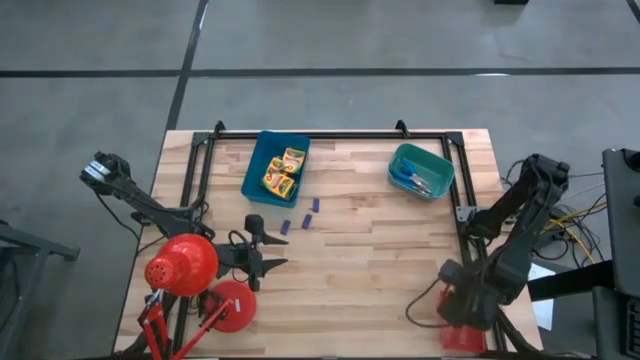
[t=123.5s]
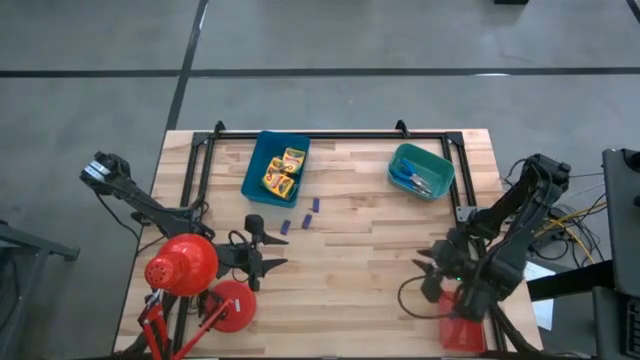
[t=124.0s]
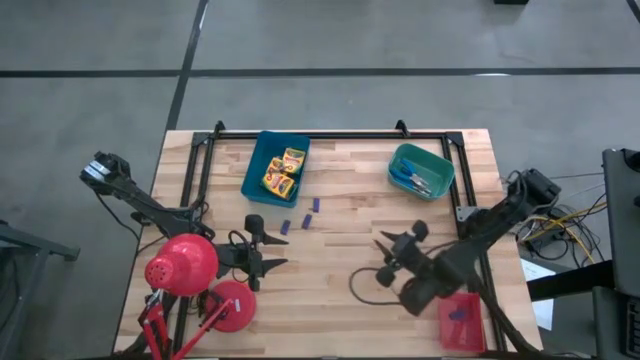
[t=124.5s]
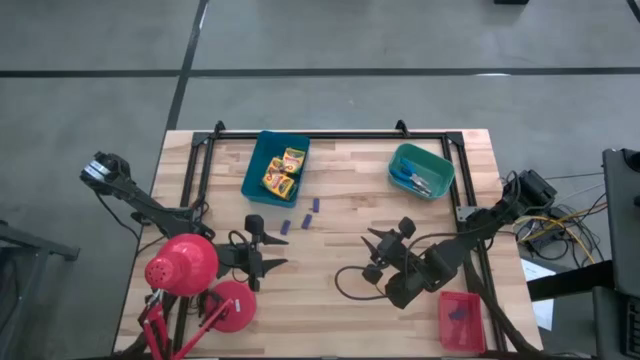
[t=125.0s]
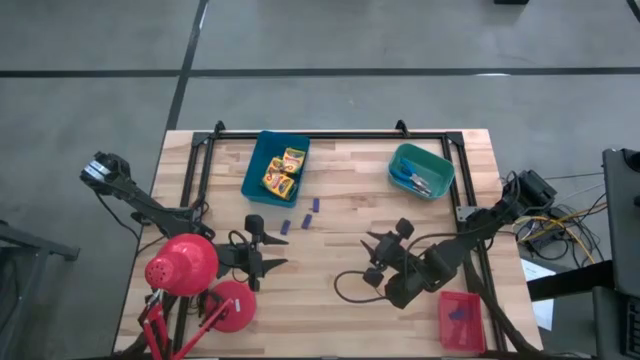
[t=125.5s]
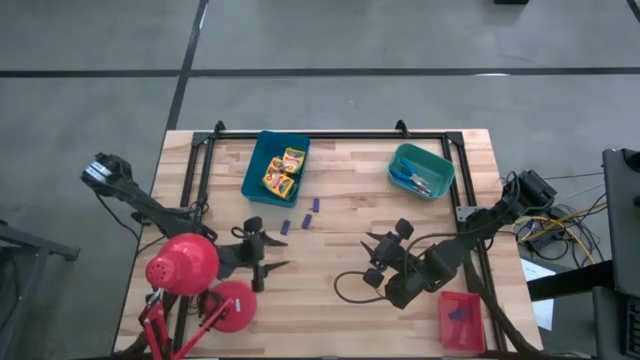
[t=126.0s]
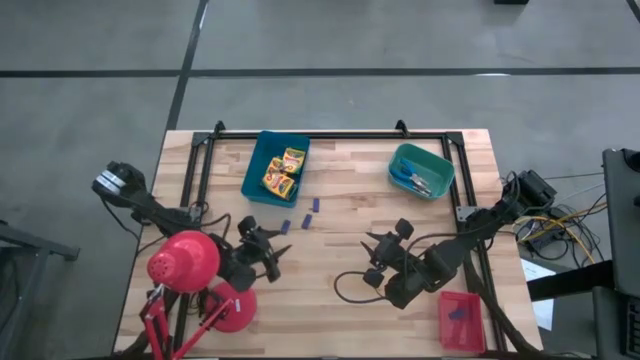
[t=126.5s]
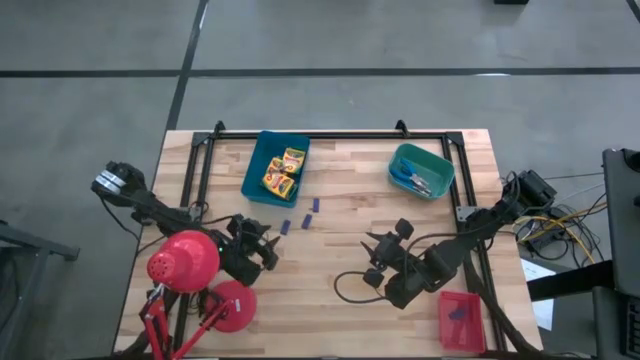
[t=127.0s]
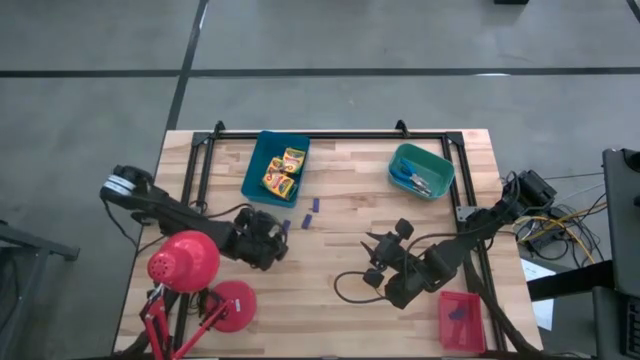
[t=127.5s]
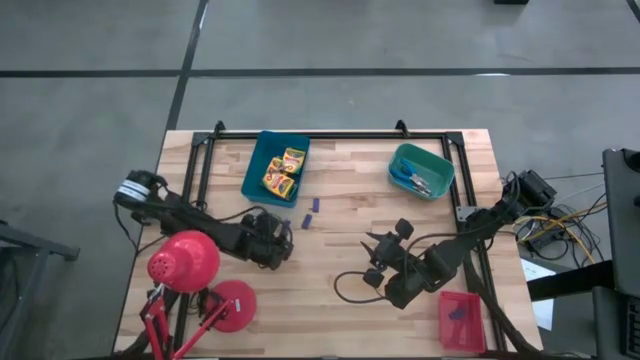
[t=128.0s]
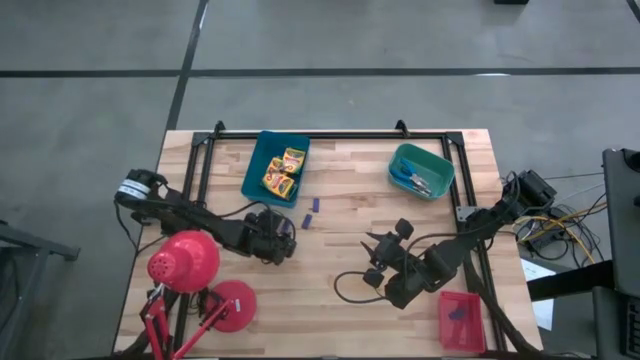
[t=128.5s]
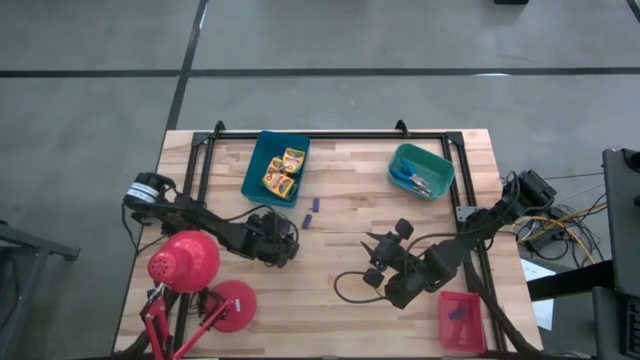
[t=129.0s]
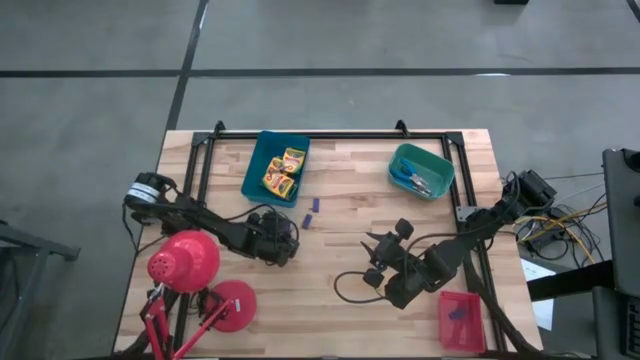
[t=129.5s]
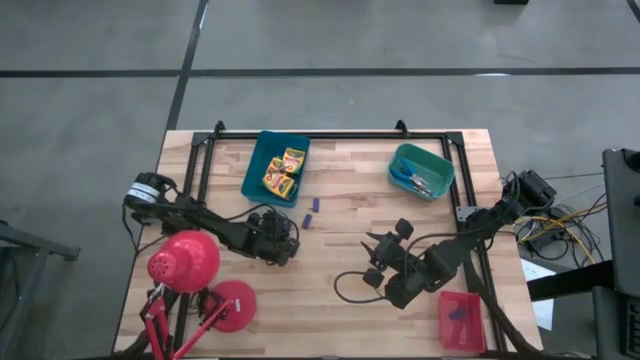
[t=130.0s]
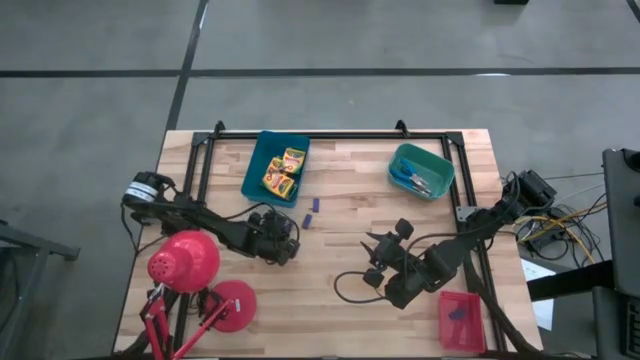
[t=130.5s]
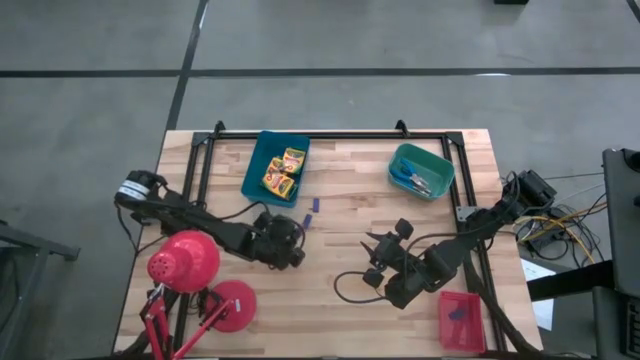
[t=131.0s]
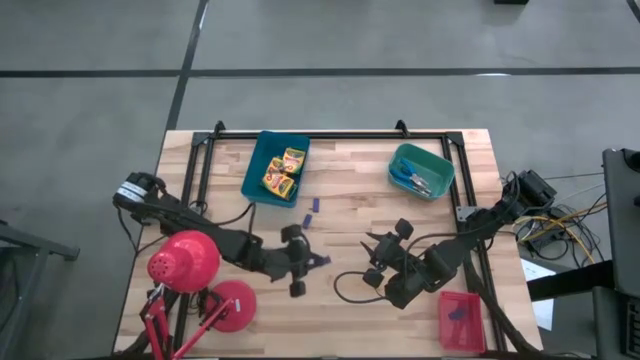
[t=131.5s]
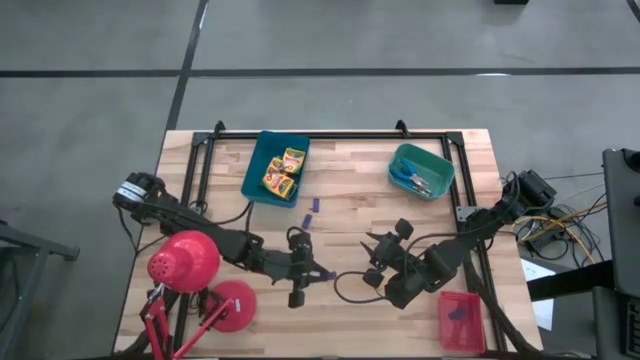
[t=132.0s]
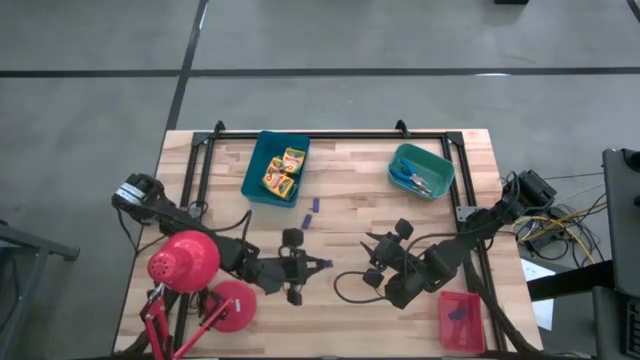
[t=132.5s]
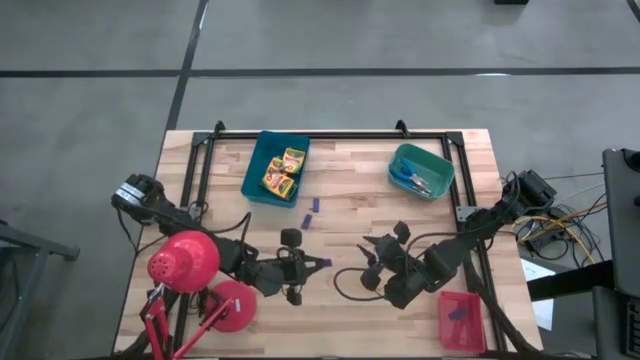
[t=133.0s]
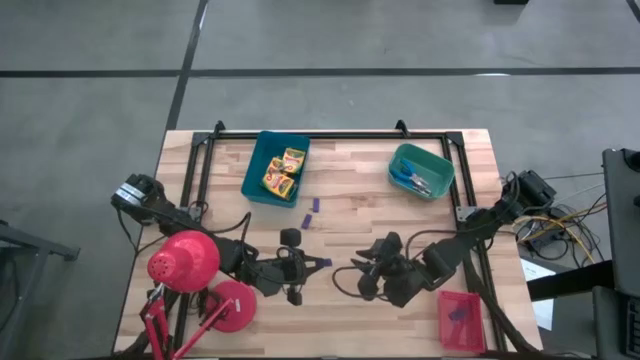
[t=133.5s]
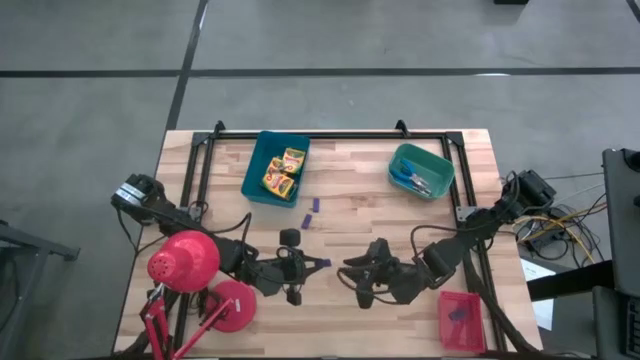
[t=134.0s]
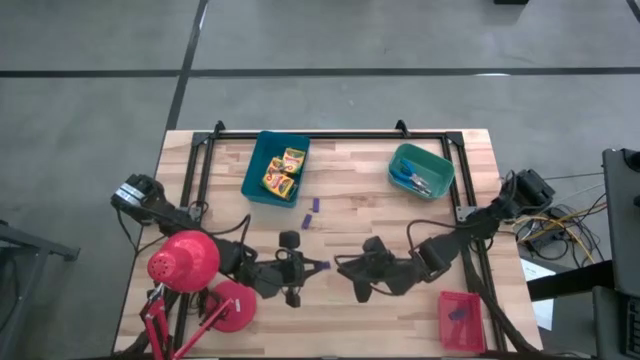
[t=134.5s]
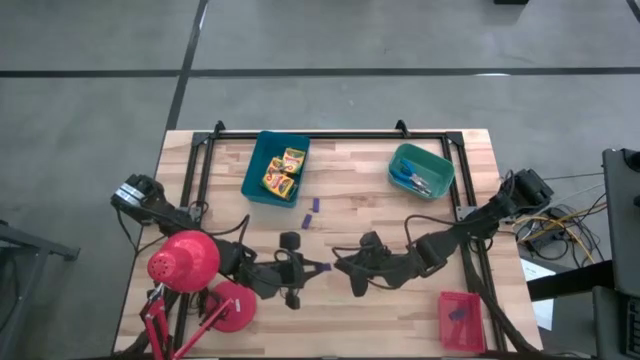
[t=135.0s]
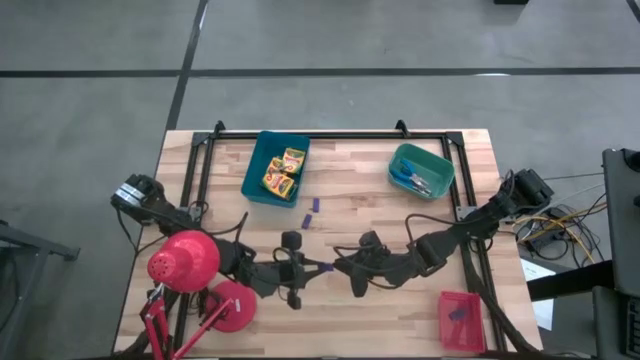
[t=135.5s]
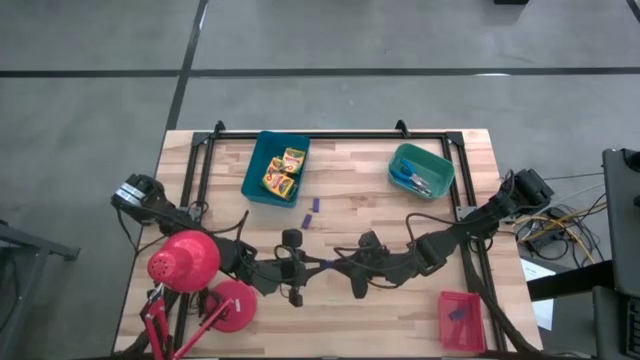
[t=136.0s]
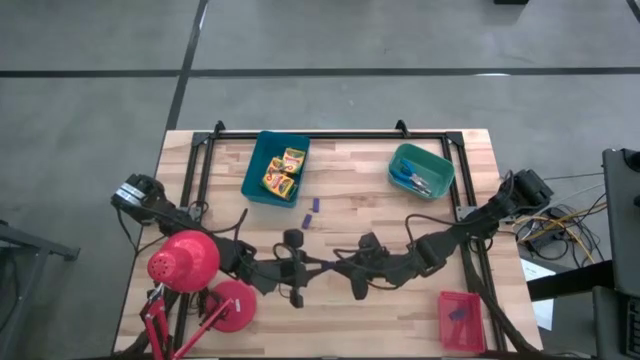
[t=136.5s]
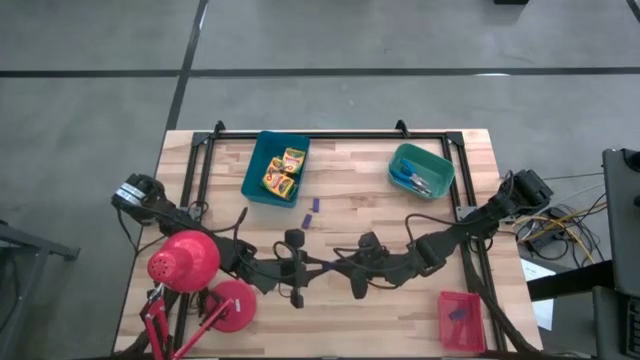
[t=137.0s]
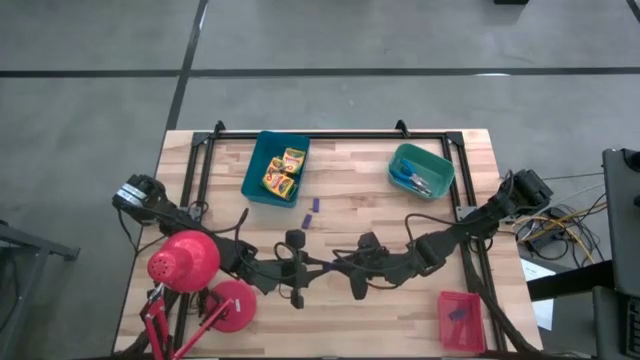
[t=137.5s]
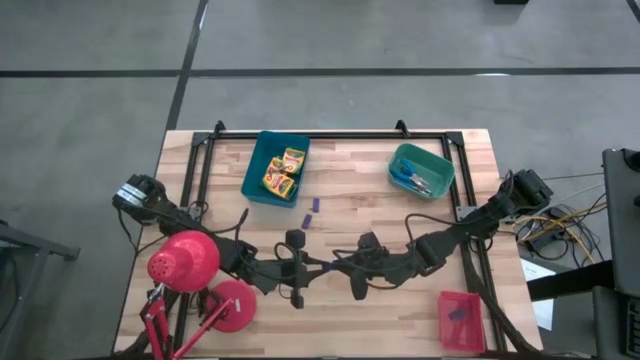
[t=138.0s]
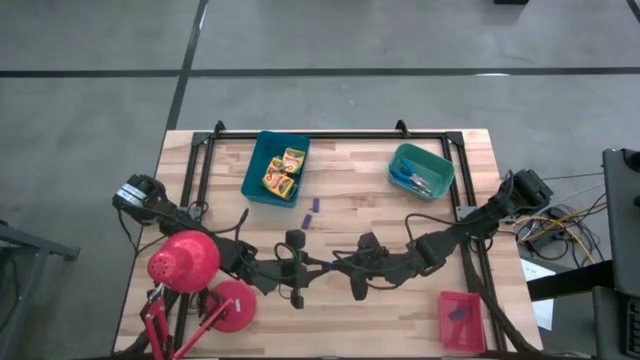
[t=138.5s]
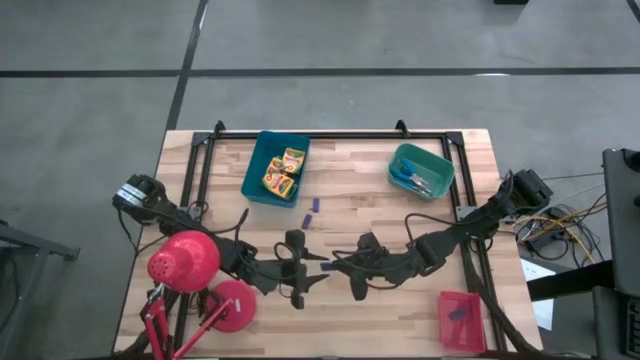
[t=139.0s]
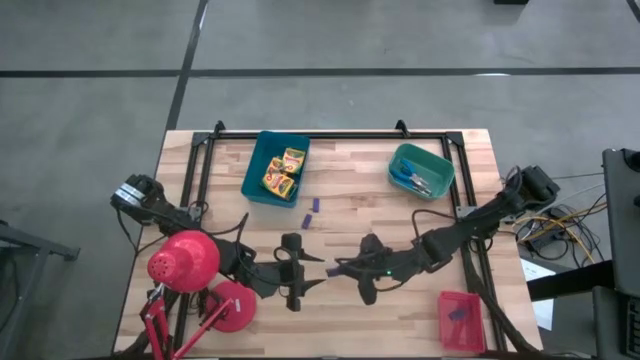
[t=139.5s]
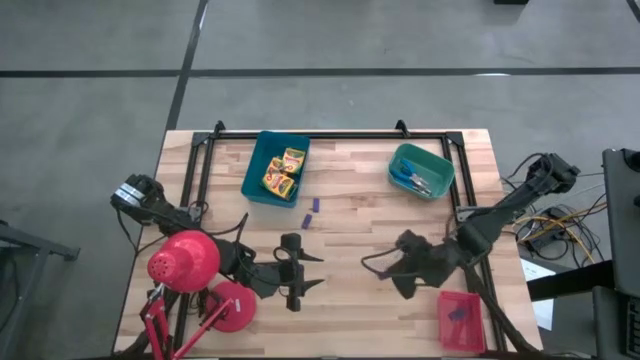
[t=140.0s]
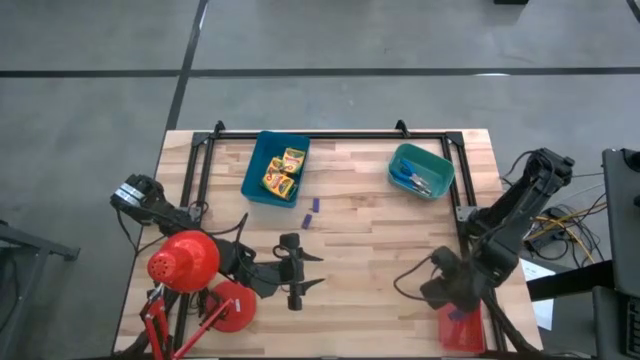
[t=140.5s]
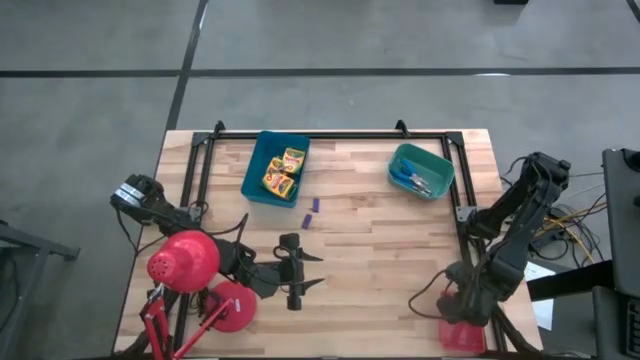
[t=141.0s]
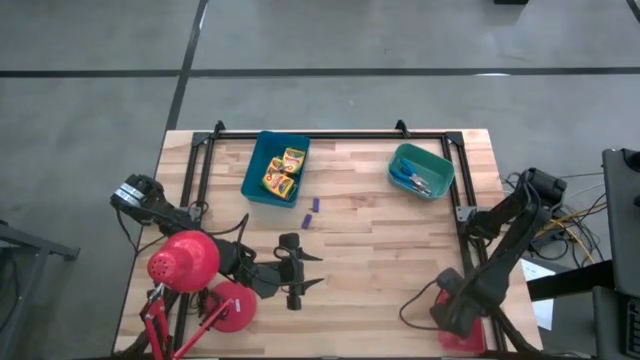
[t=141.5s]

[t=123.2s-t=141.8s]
Task: Pick & Place School Supplies
Put the purple eraser into the red bin

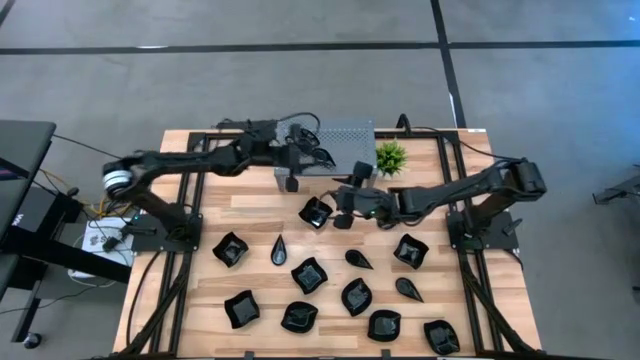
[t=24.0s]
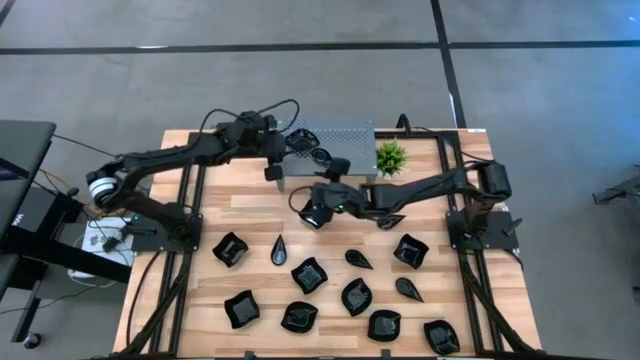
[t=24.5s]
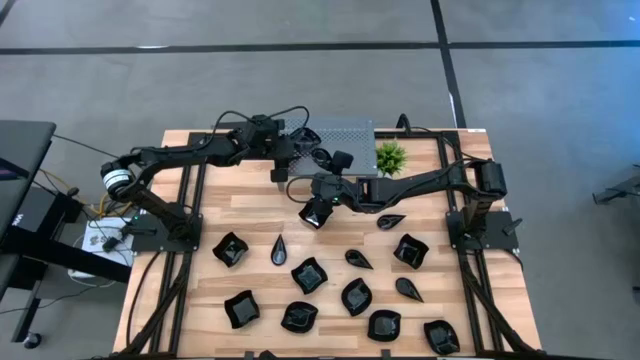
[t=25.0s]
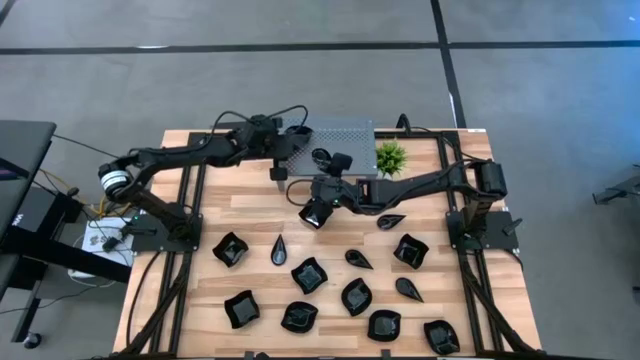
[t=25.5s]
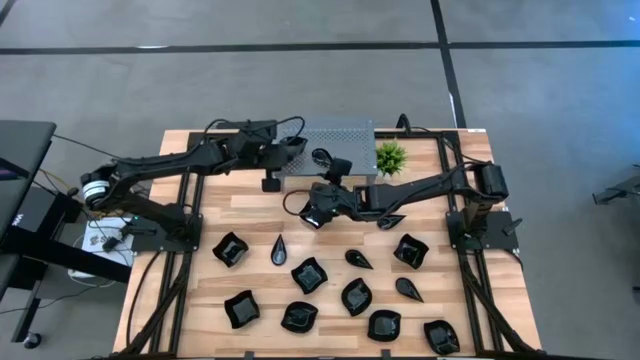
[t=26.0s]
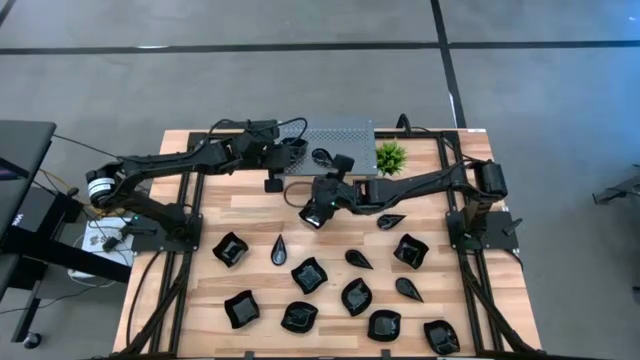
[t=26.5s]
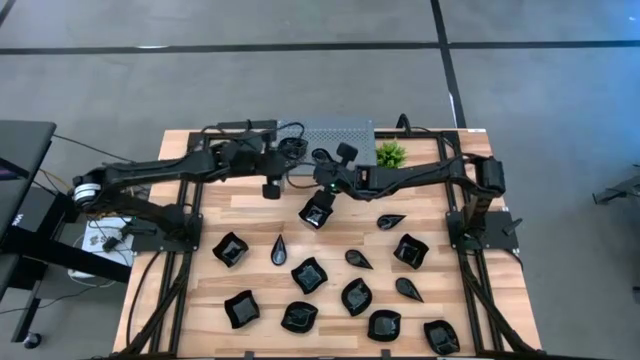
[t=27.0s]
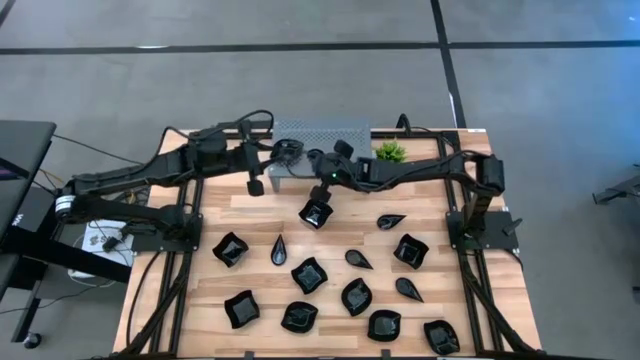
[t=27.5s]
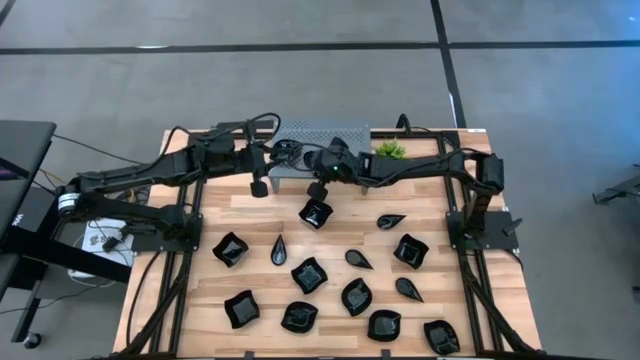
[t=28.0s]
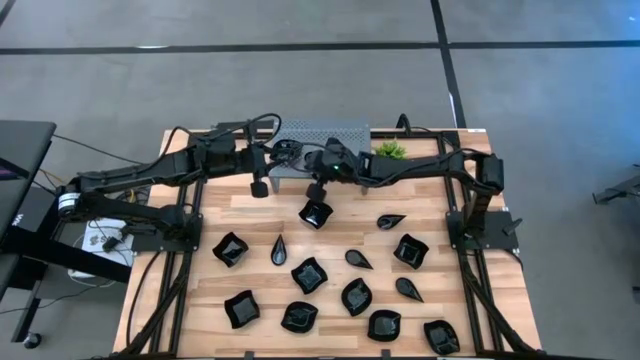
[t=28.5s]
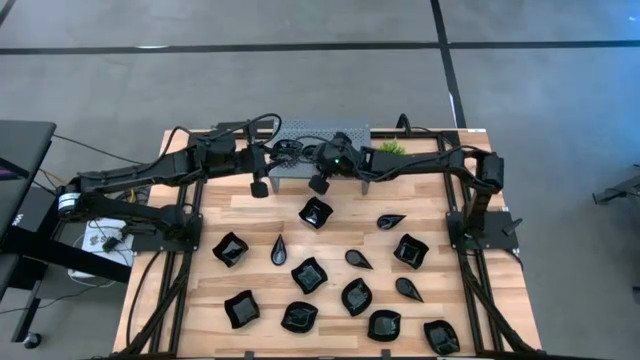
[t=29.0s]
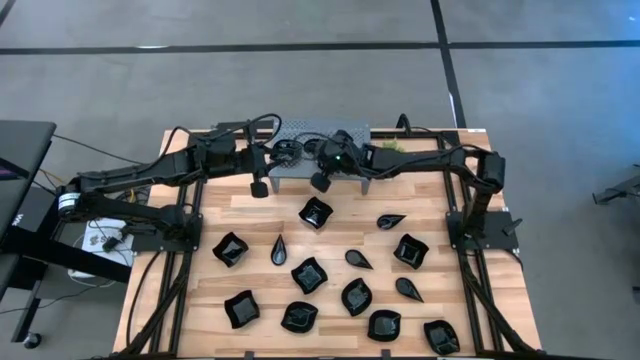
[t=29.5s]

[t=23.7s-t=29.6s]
Task: Pick & Place Mini shaped plates
Adjust the plates
